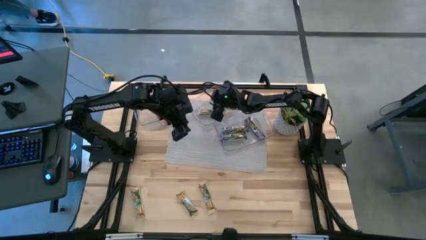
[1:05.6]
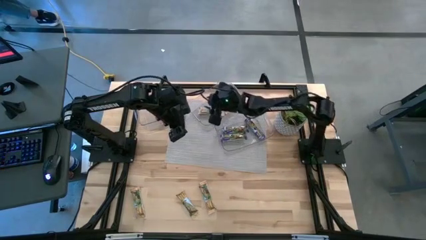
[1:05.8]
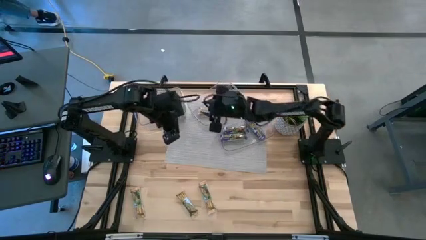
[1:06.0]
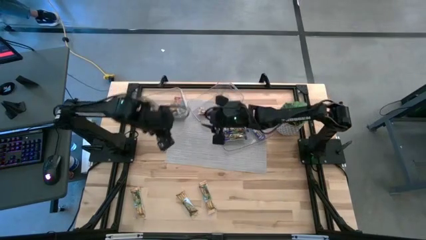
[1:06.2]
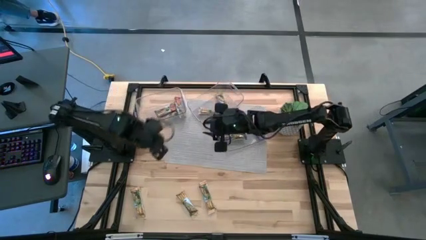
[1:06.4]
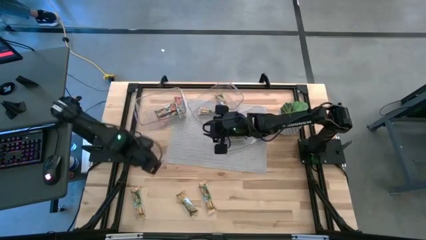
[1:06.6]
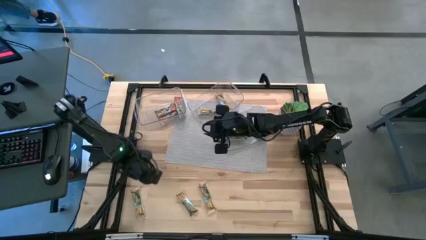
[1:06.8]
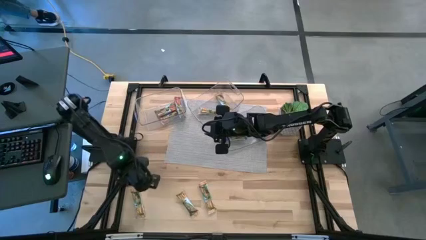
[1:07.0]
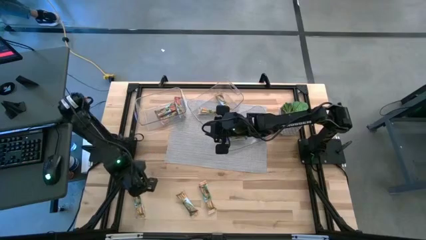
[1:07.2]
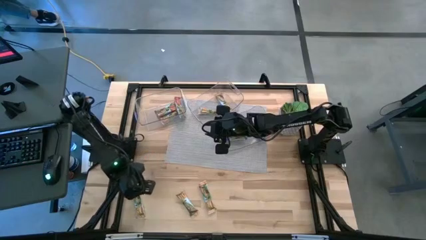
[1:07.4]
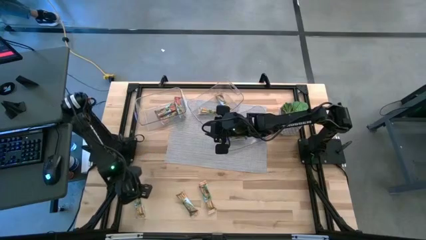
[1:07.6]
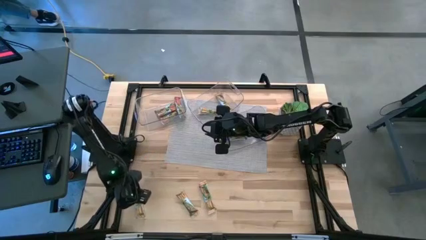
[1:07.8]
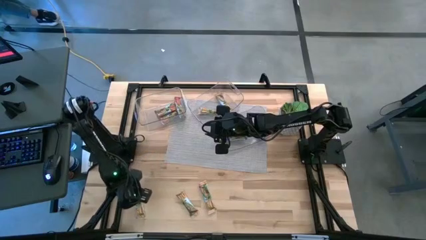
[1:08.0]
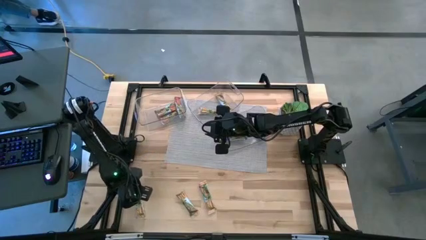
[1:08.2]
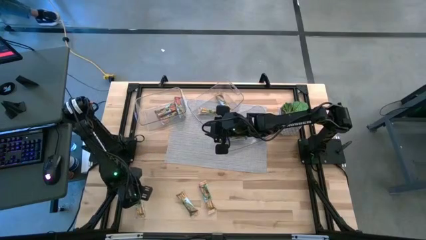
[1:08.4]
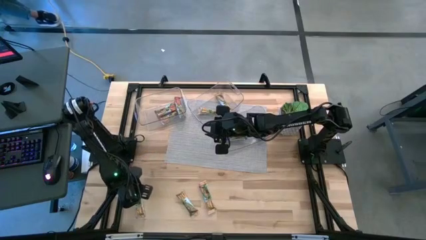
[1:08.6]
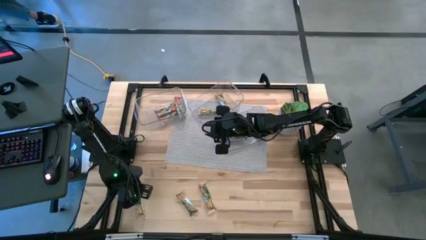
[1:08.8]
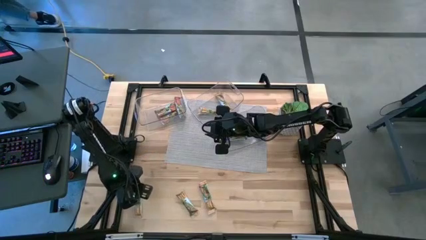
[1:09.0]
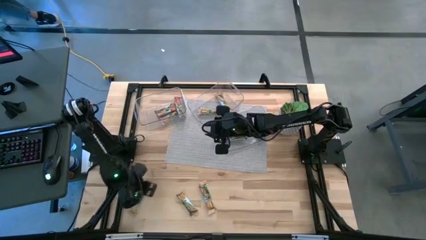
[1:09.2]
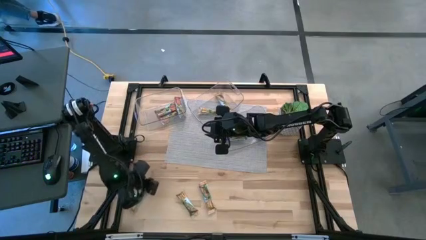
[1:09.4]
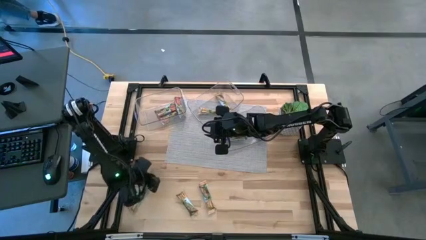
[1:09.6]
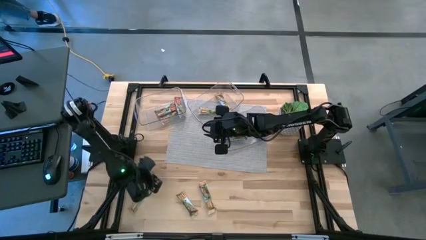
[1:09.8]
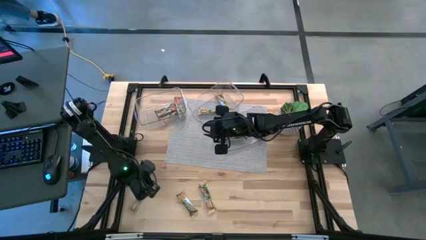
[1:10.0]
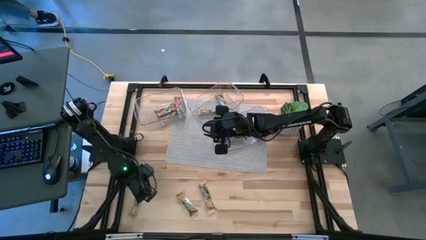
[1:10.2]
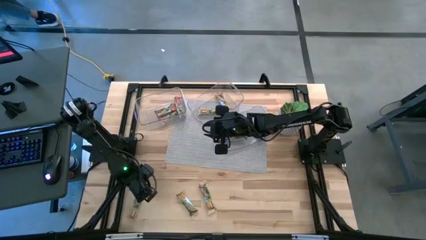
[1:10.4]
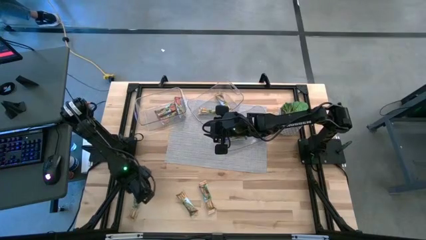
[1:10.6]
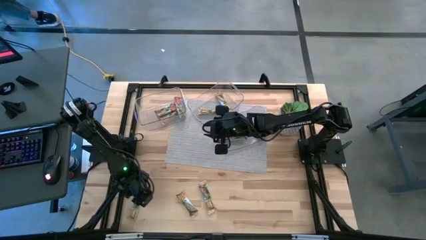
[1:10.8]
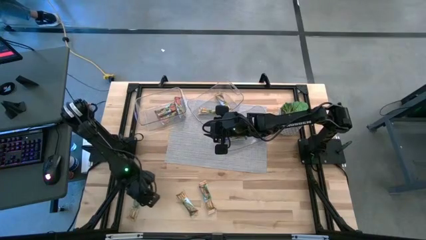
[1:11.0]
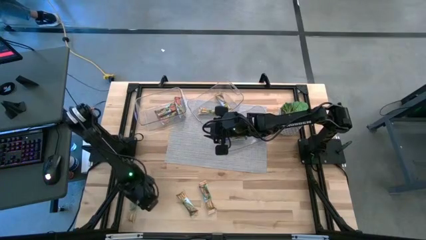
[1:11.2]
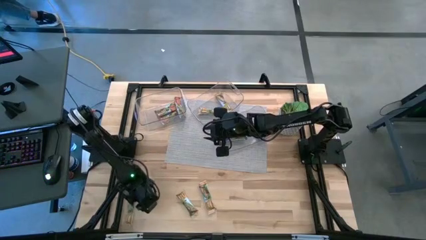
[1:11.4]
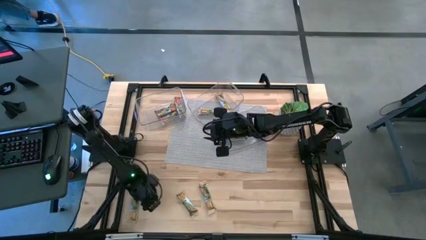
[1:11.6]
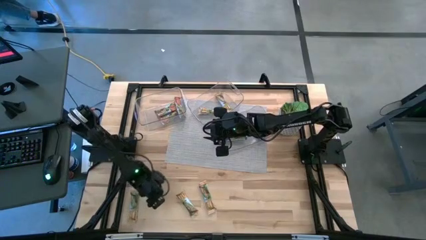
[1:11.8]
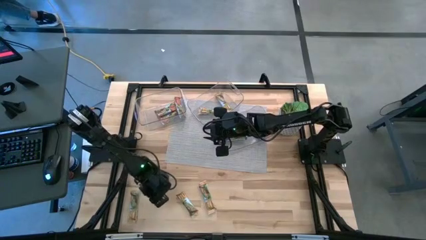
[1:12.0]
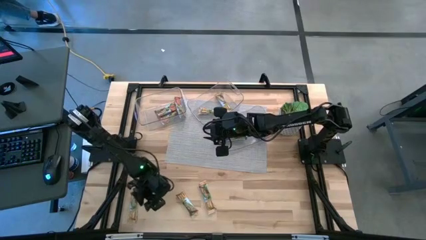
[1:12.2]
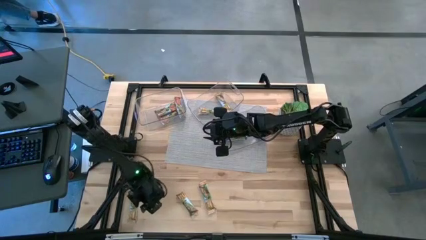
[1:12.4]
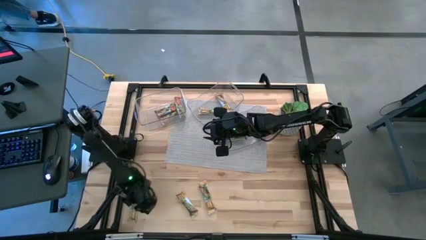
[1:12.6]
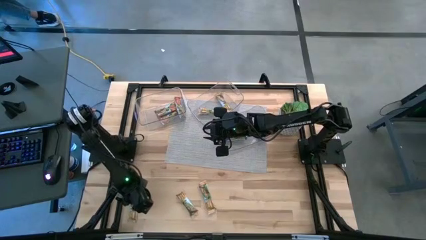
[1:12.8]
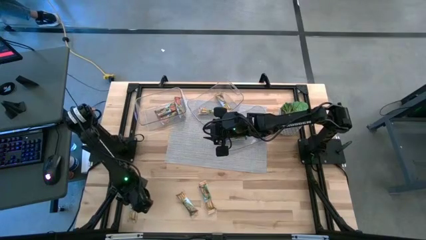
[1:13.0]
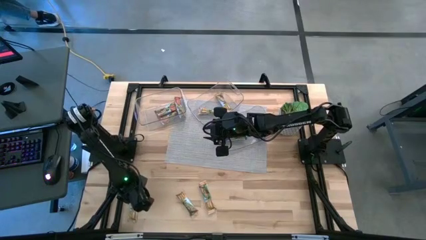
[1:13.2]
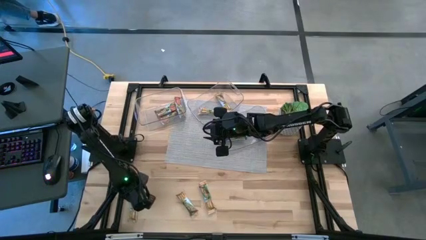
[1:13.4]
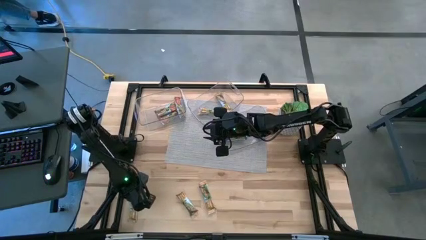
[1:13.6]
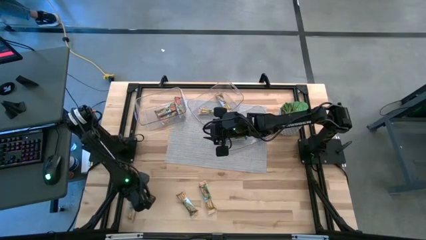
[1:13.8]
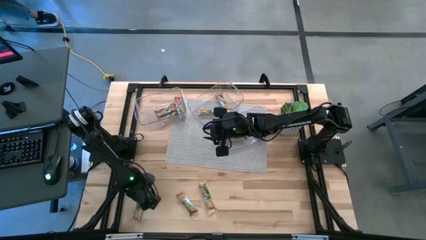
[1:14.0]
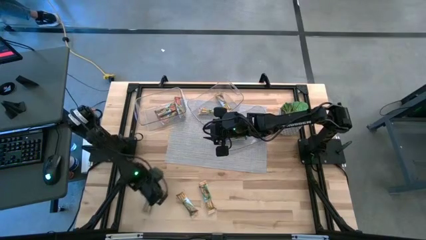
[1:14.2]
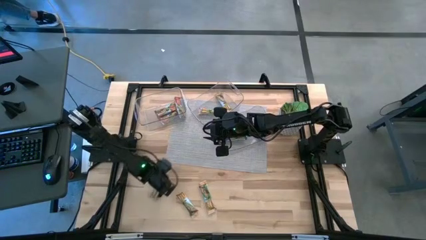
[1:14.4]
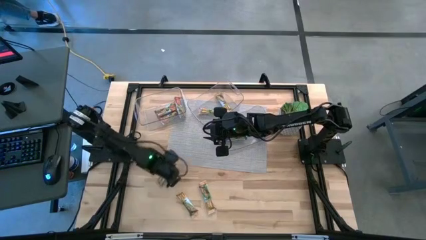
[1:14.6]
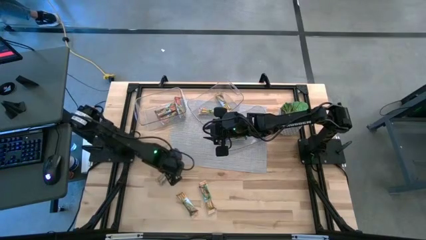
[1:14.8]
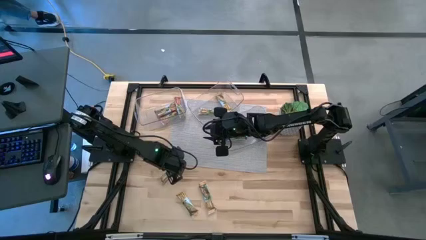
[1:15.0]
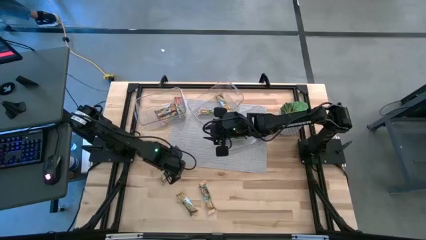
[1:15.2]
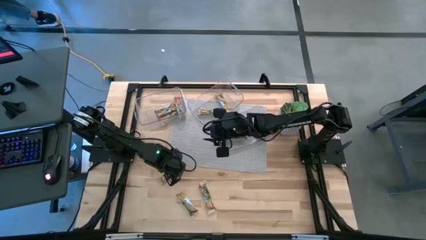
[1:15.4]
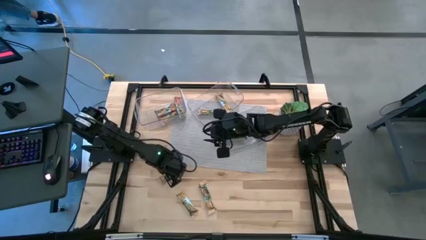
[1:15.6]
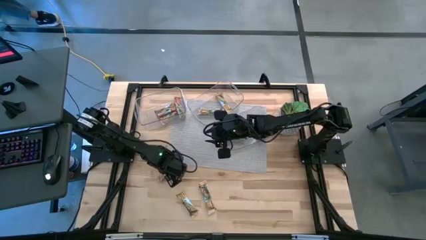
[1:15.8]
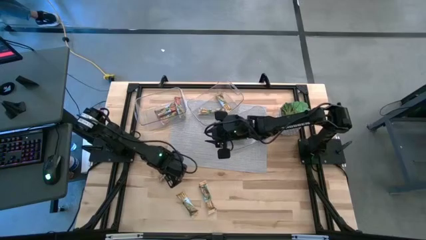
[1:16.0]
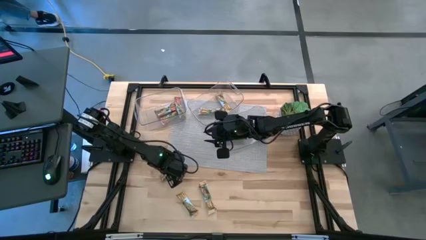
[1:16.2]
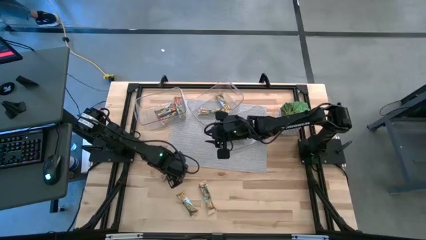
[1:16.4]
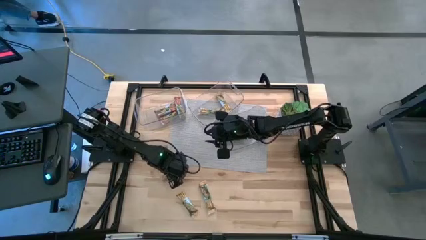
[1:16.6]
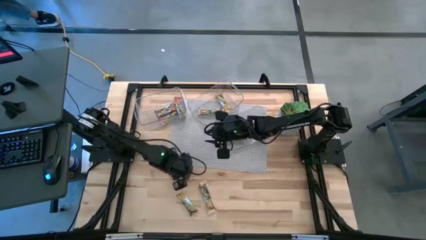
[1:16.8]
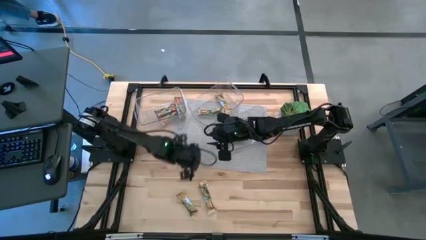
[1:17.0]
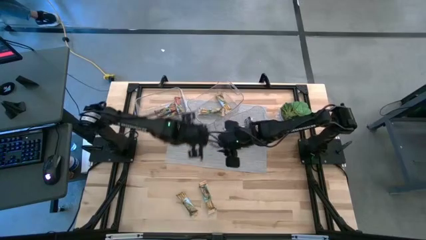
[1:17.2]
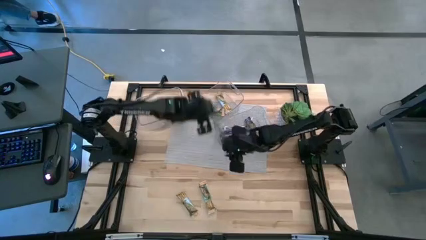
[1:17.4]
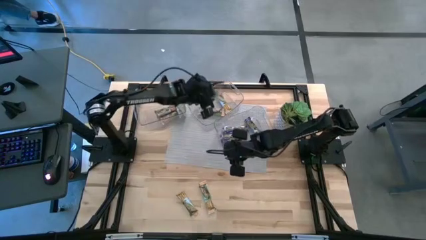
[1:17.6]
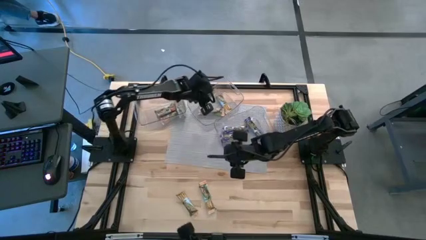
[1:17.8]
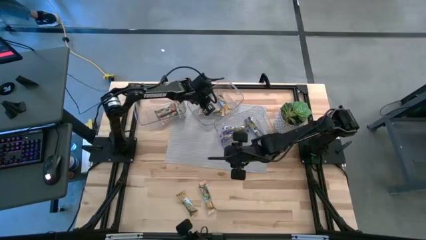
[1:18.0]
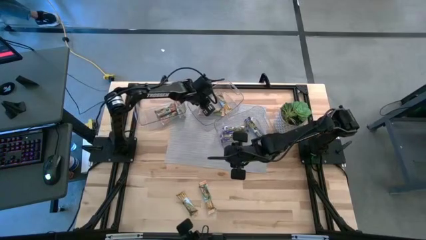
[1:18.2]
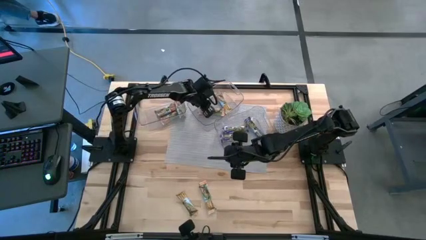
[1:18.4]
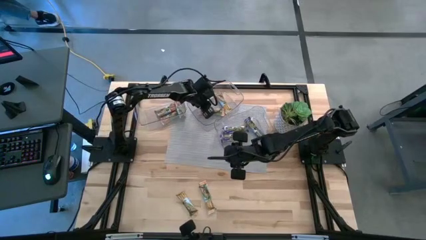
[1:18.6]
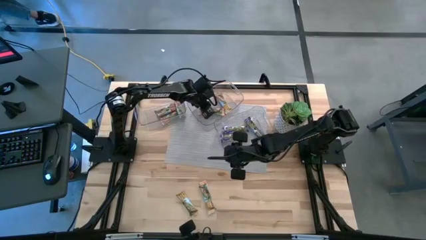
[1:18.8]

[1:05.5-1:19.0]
Task: Pick and place Granola Bars by type
Put the orange granola bar into the middle transparent bin

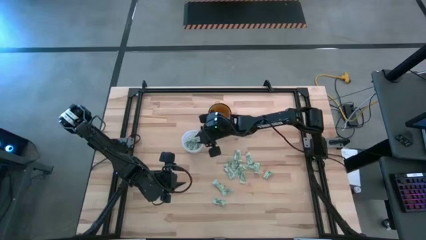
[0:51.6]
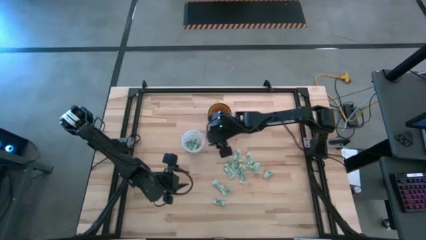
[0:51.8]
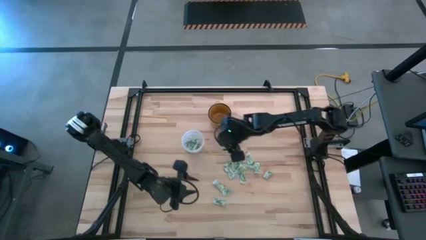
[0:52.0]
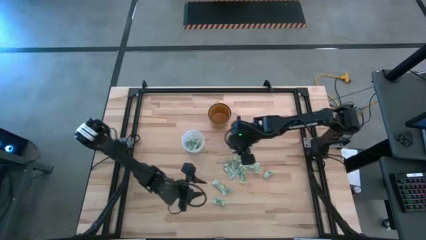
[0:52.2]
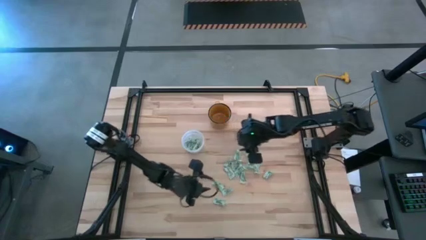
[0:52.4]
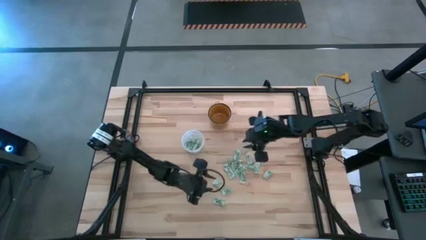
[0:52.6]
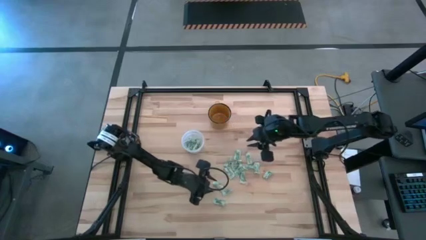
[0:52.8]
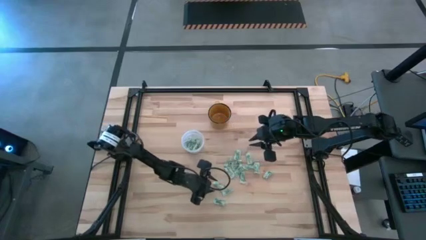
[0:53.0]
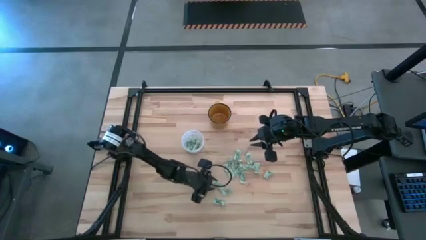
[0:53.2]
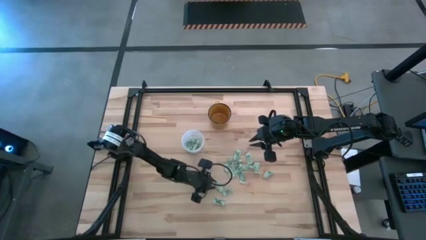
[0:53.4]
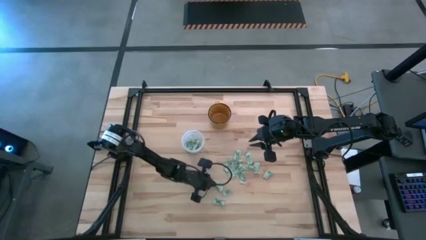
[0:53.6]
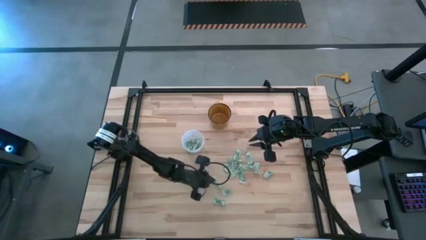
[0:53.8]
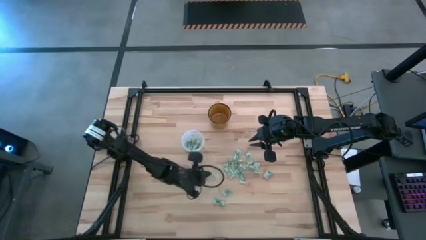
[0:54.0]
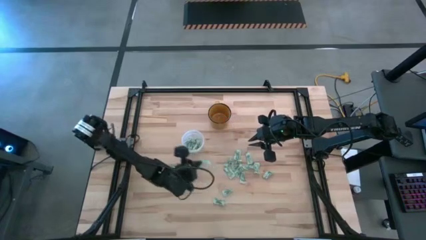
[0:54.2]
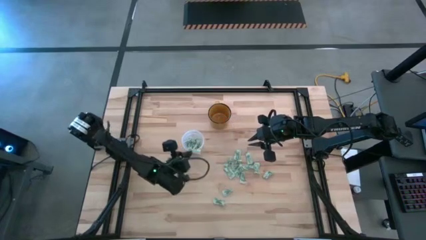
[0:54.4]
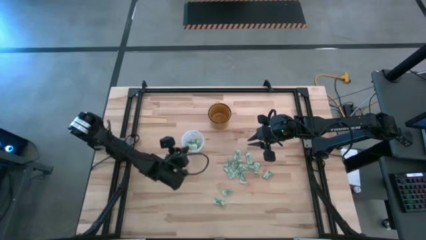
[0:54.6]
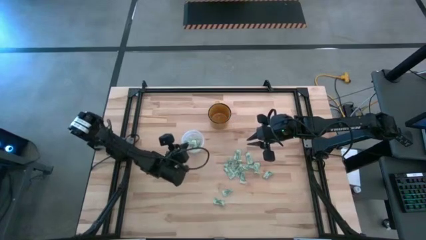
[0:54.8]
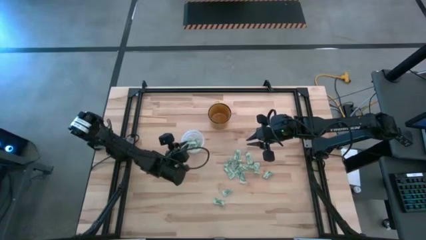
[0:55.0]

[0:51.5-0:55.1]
Task: Pick and place Stevia / Truvia into bins
Put the stevia packet into the transparent bin
